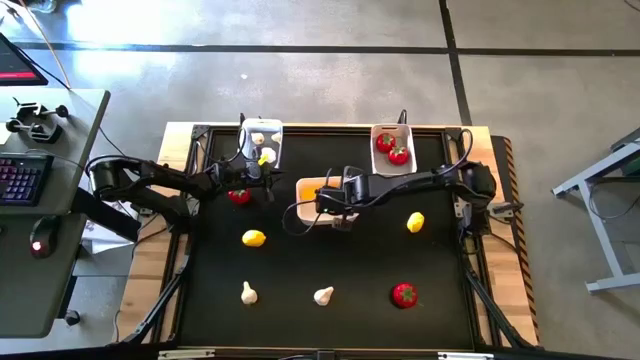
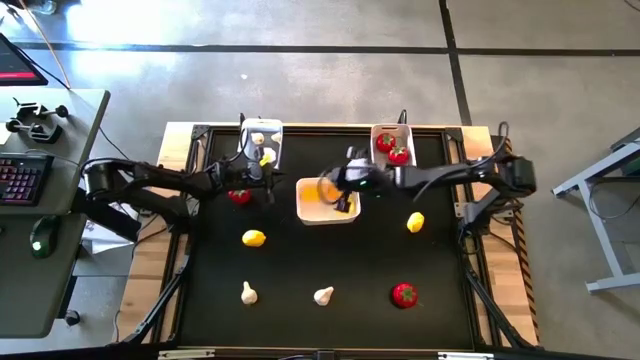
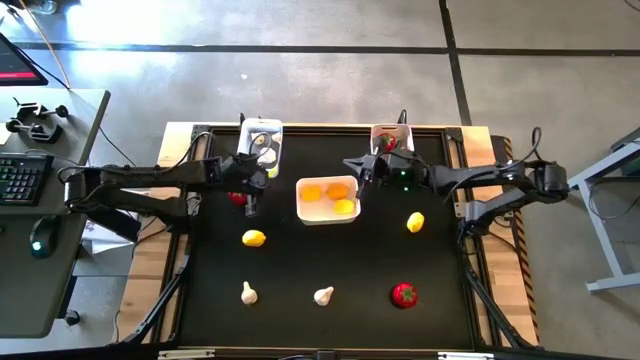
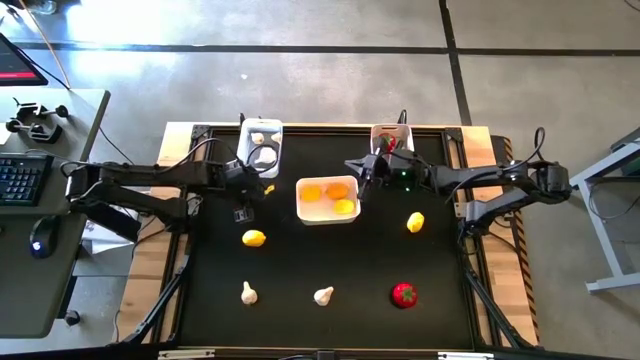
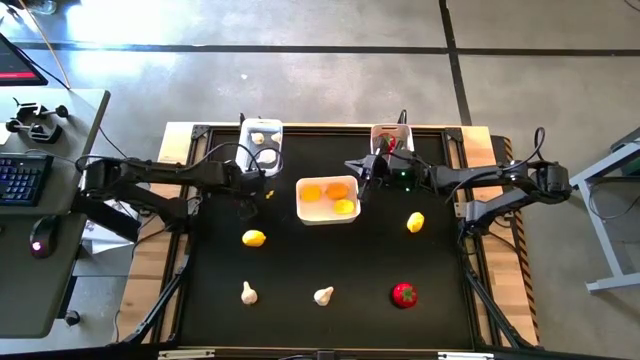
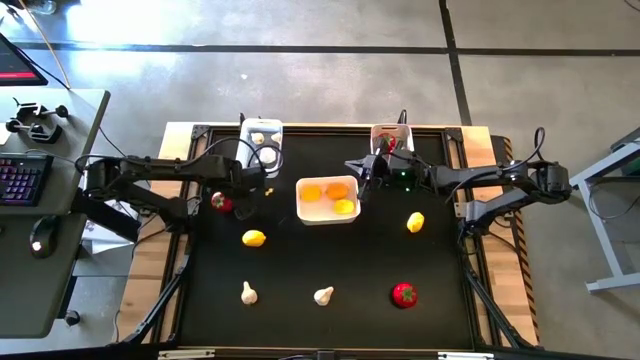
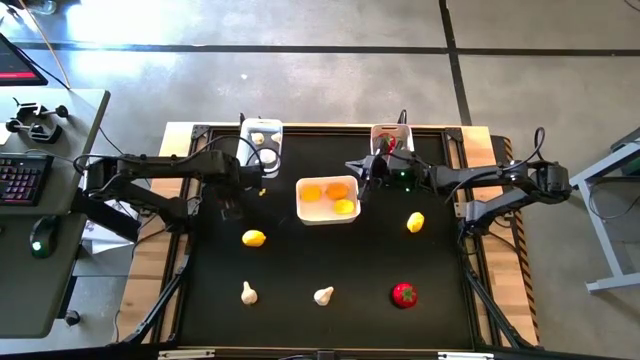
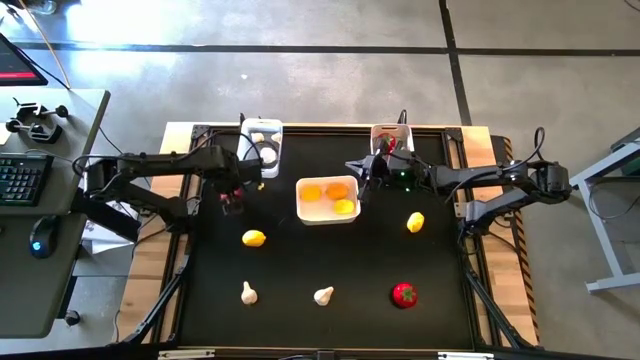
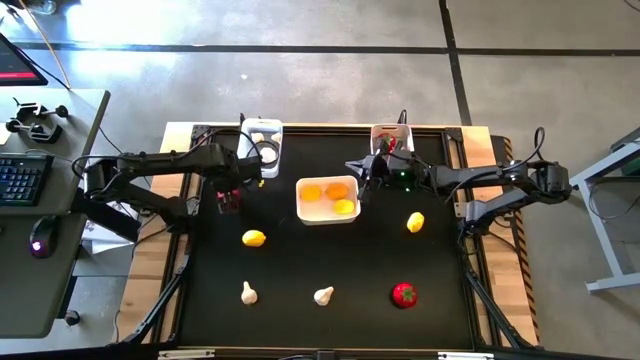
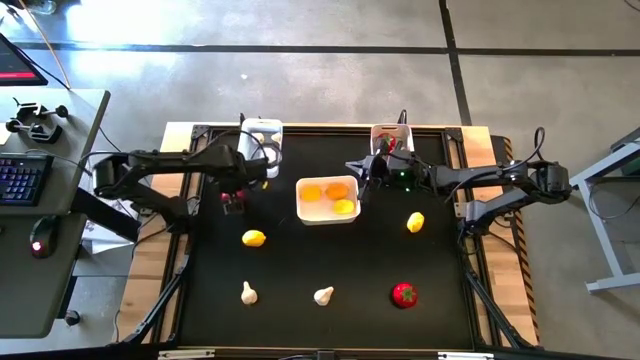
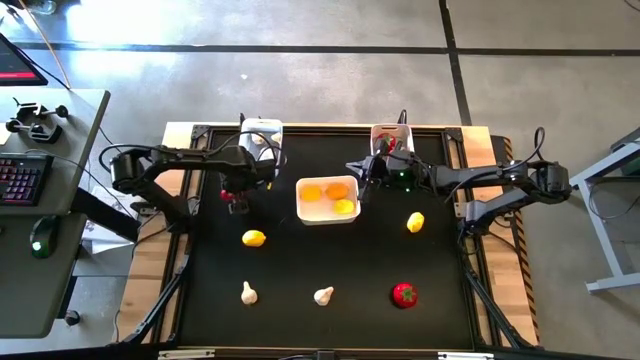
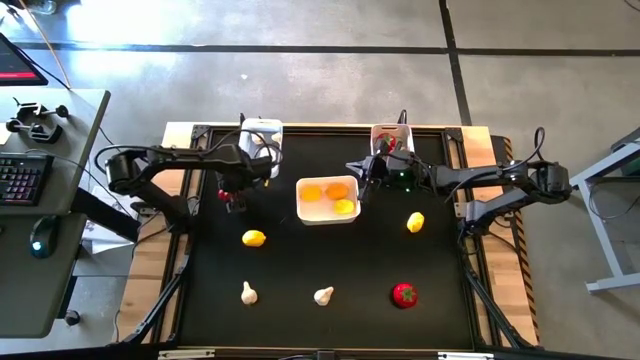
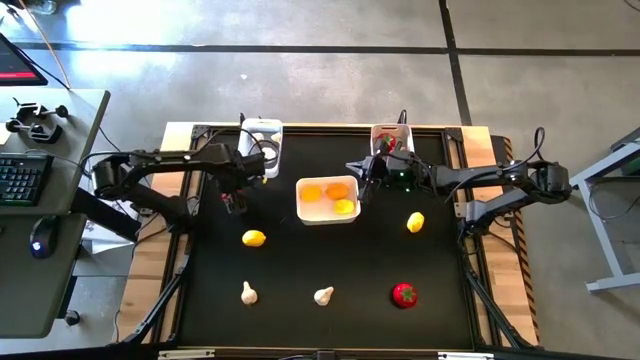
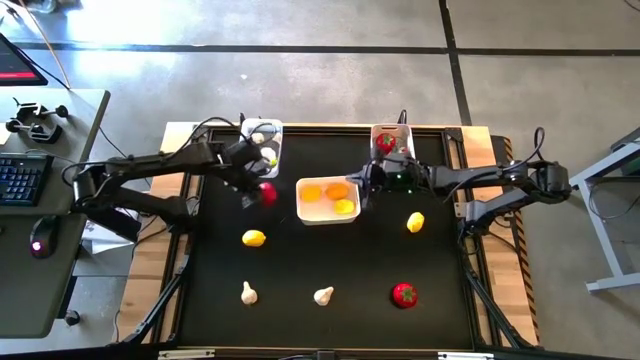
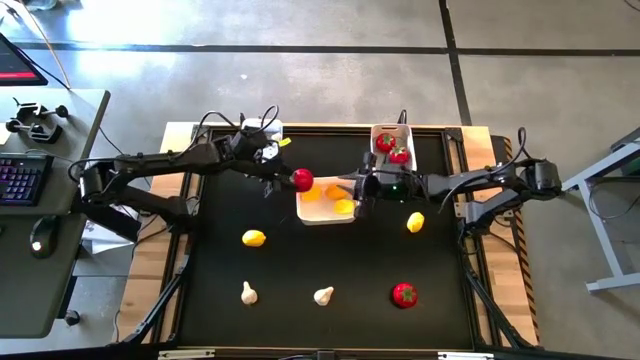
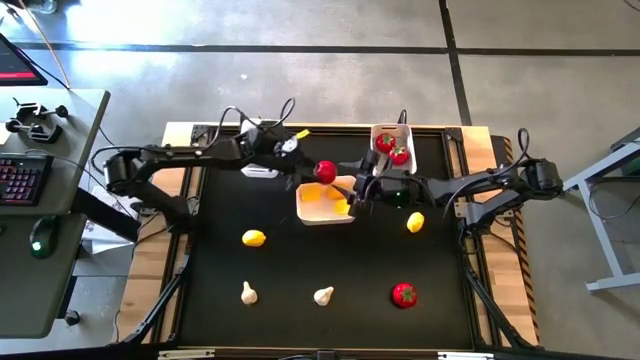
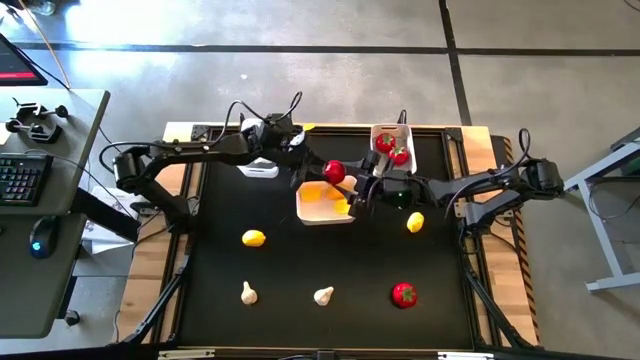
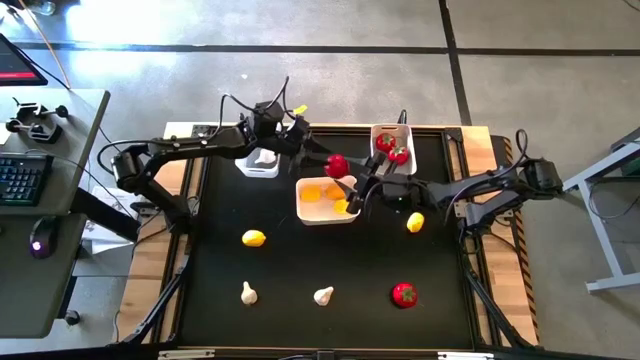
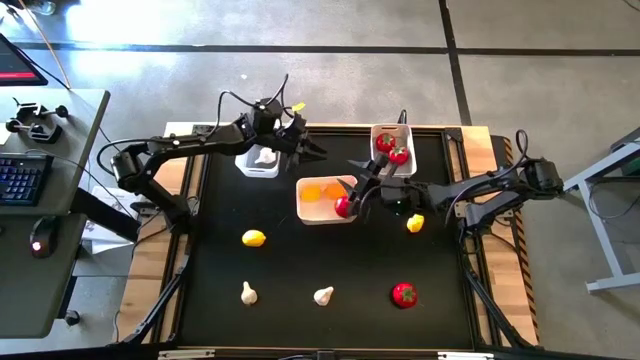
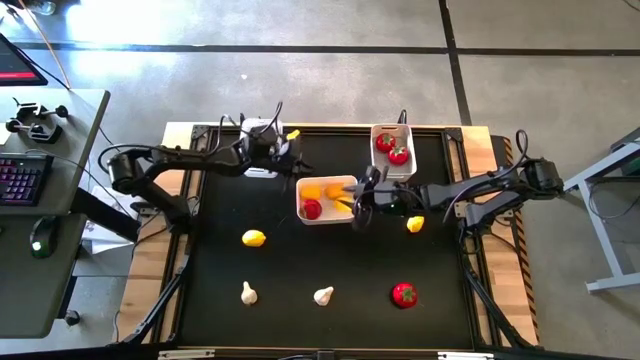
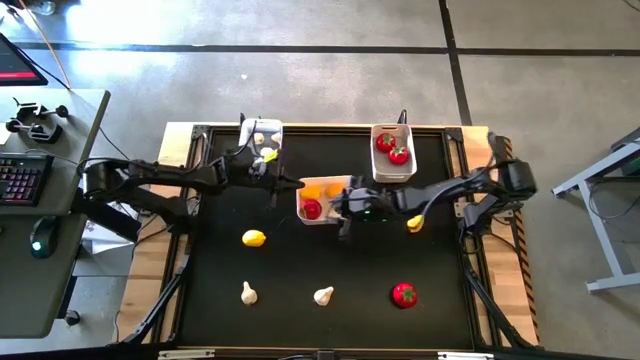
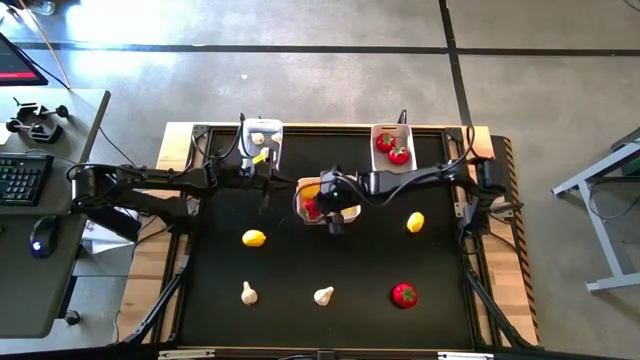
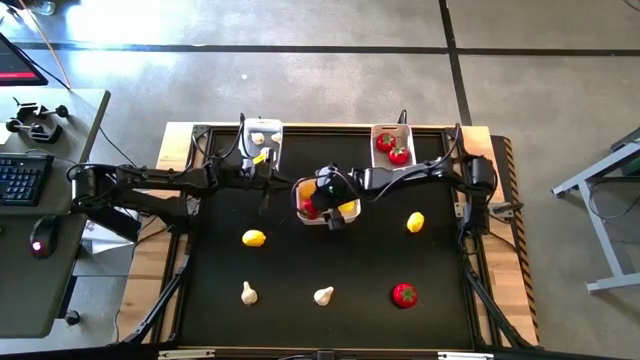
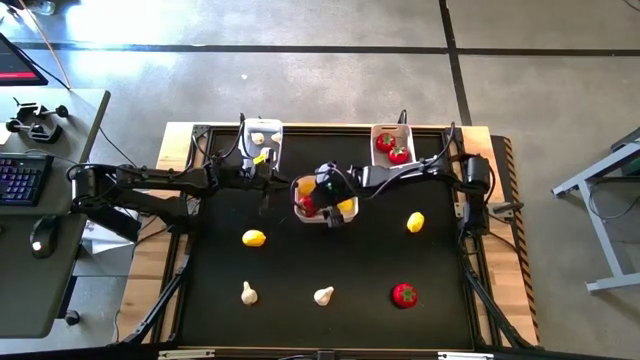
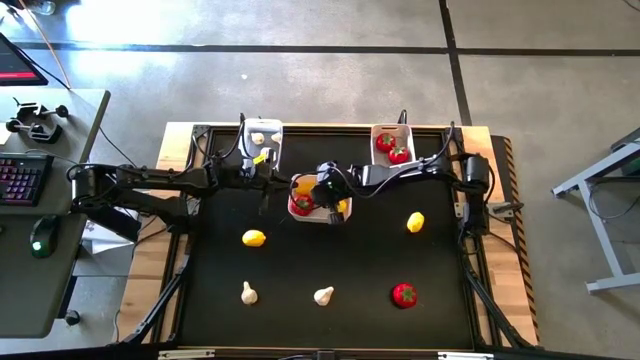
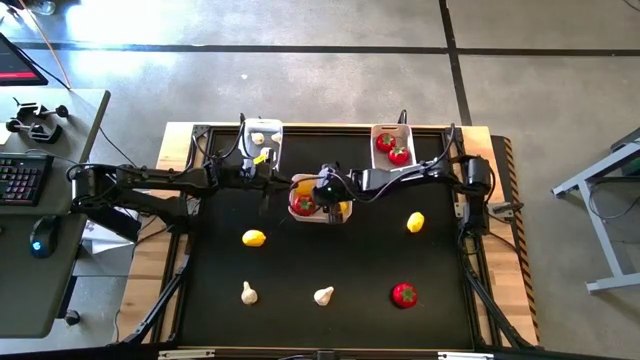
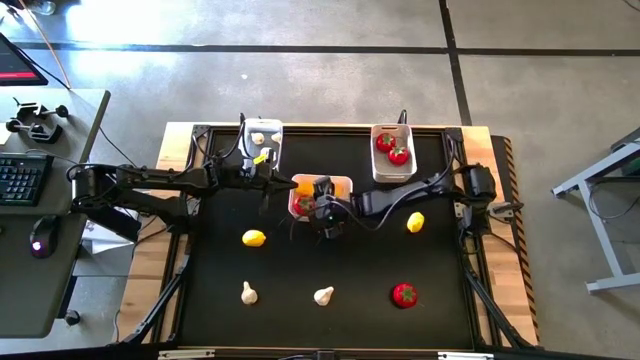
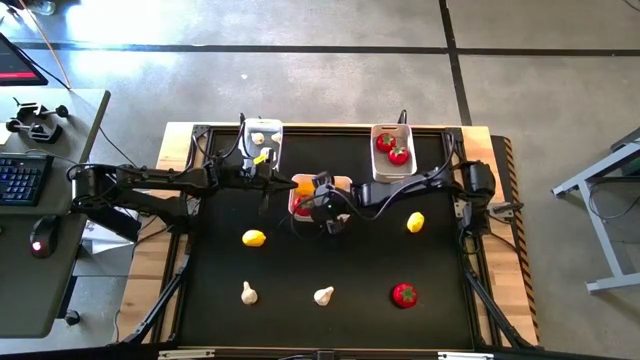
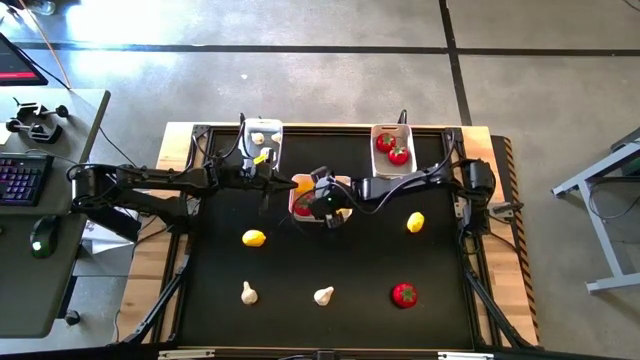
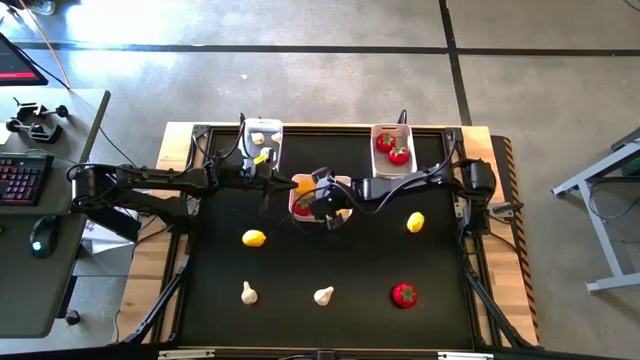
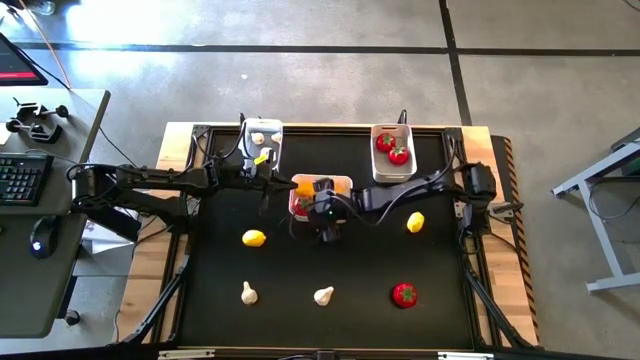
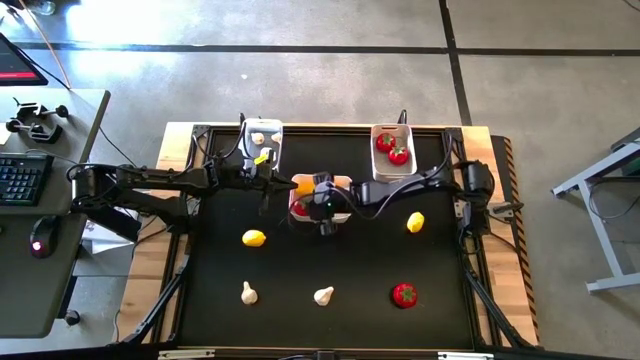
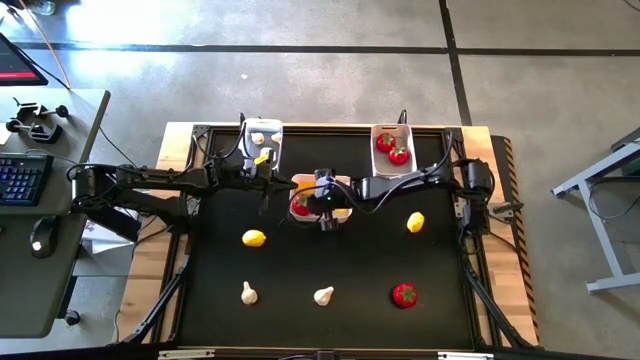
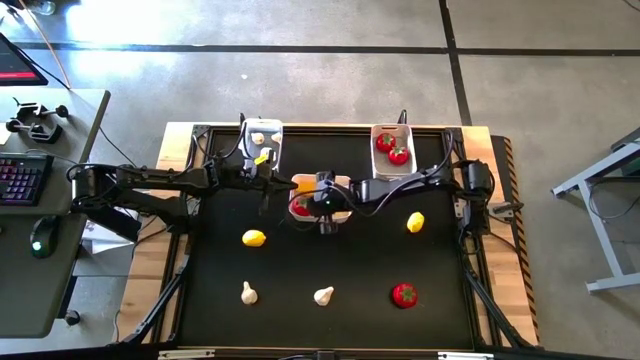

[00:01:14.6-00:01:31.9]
Task: Sort produce into baskets
Put the red tomato into the gray bin

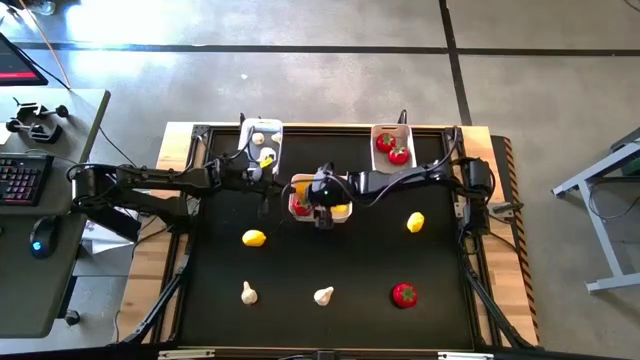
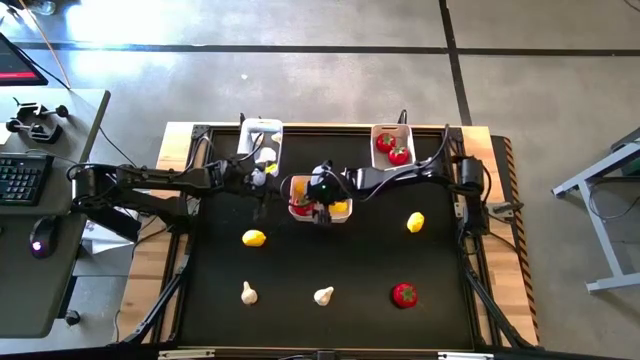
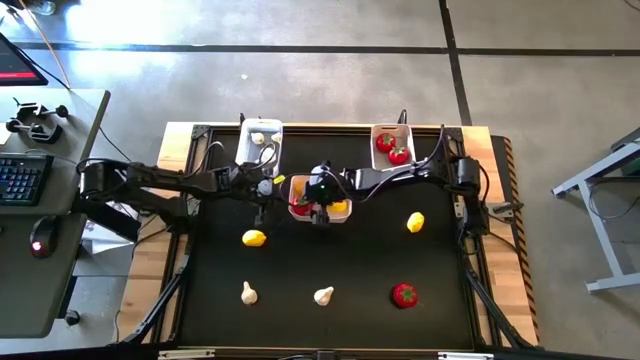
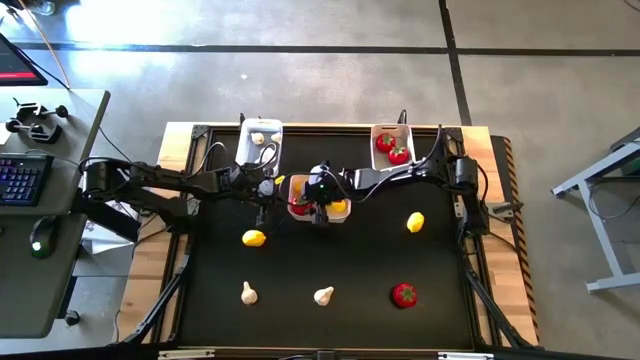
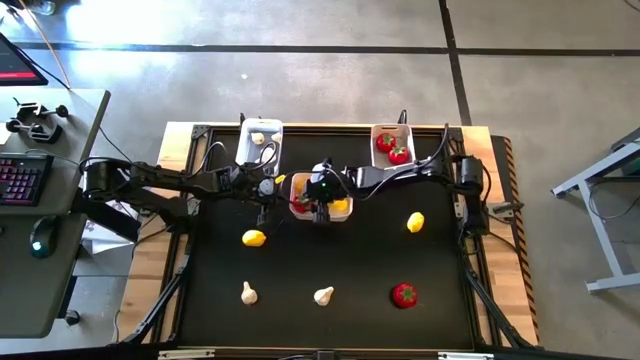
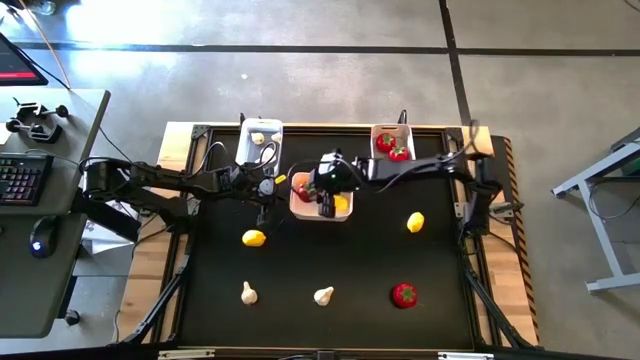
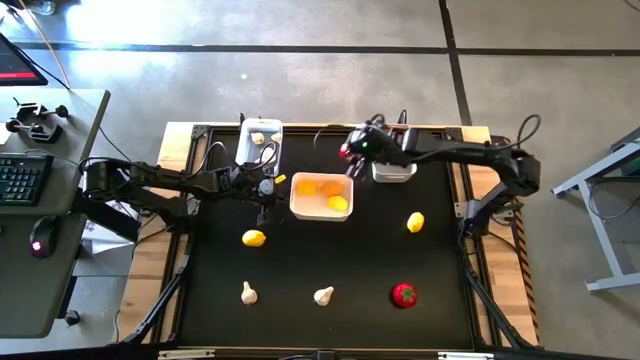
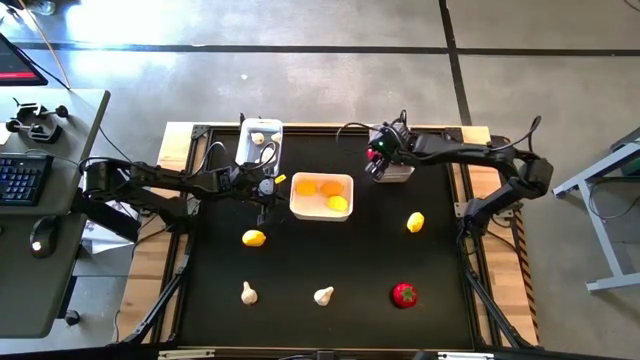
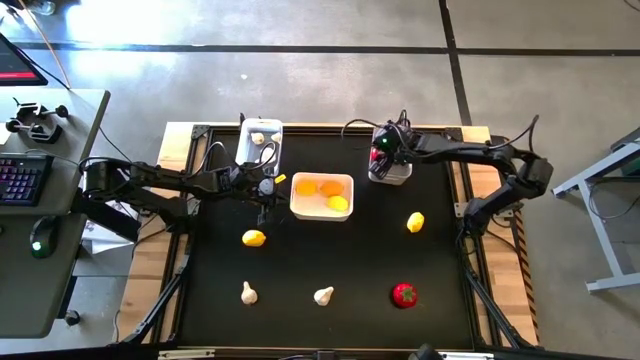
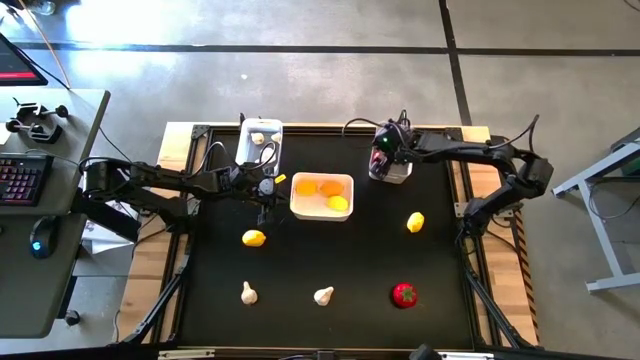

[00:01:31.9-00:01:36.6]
Put the red tomato into the gray bin
